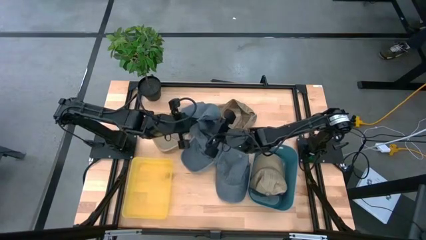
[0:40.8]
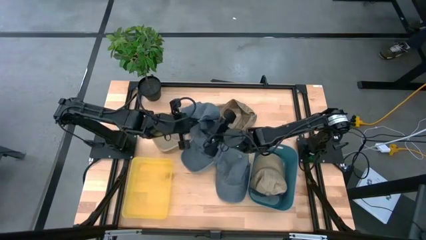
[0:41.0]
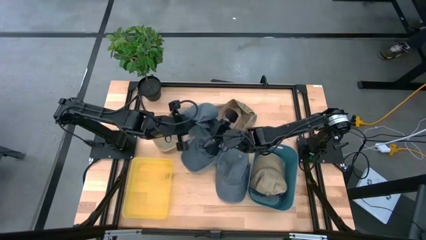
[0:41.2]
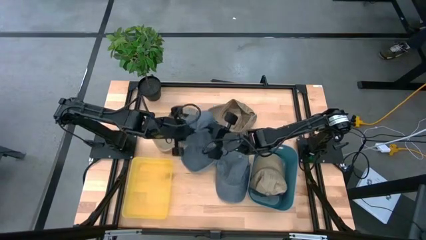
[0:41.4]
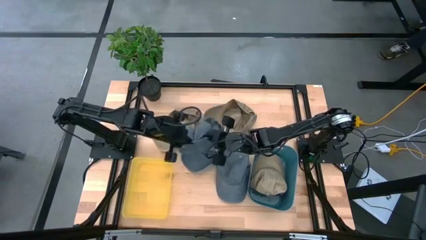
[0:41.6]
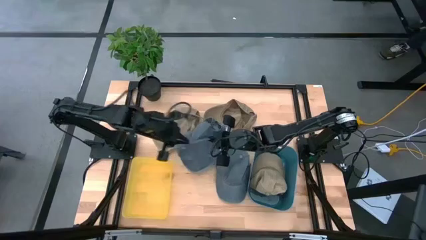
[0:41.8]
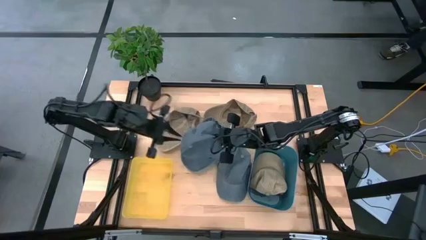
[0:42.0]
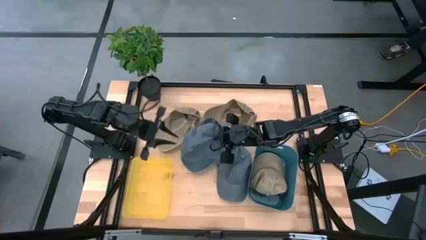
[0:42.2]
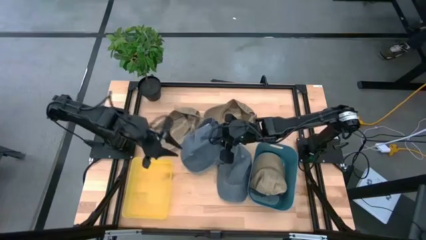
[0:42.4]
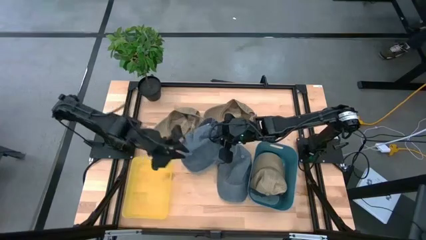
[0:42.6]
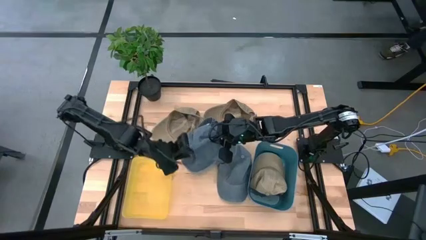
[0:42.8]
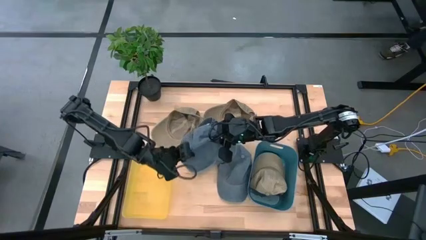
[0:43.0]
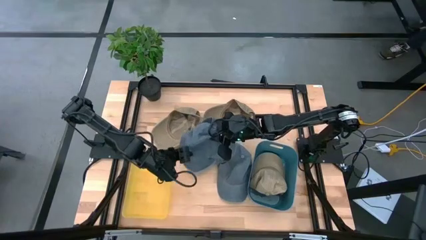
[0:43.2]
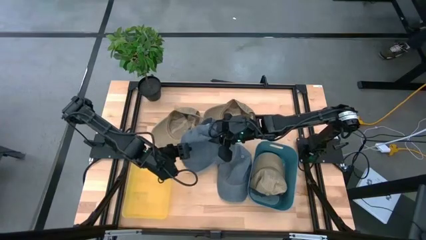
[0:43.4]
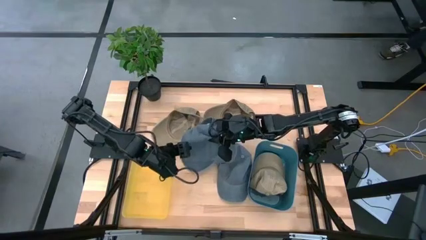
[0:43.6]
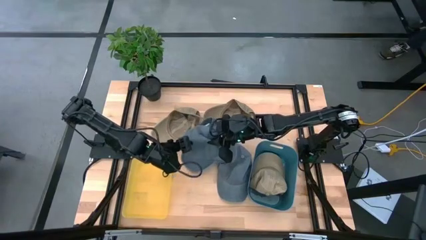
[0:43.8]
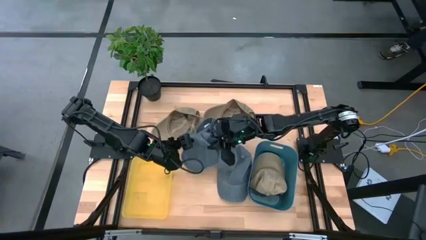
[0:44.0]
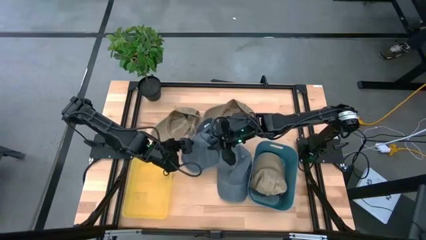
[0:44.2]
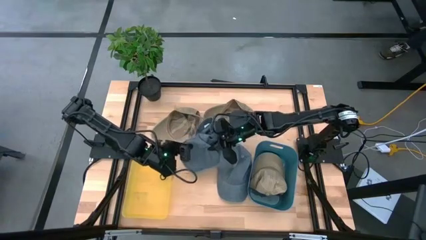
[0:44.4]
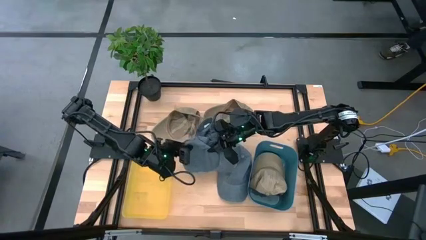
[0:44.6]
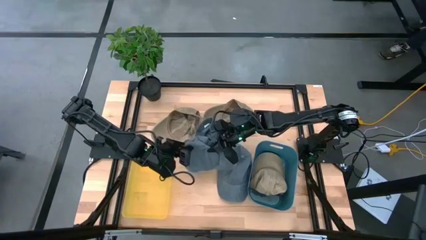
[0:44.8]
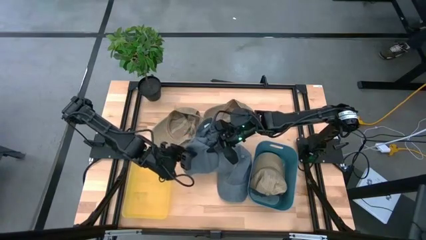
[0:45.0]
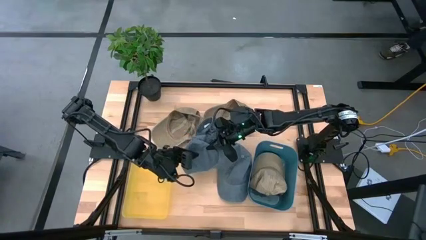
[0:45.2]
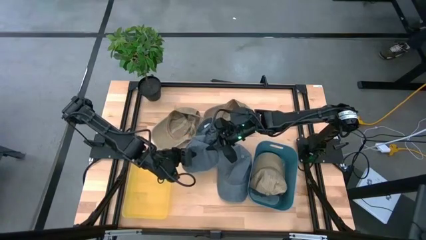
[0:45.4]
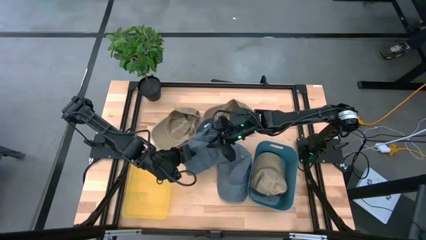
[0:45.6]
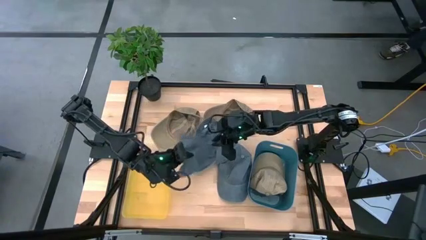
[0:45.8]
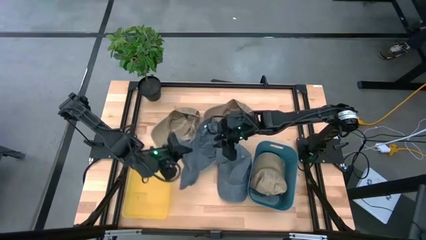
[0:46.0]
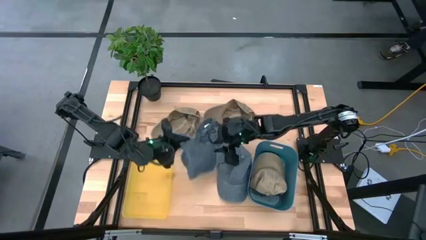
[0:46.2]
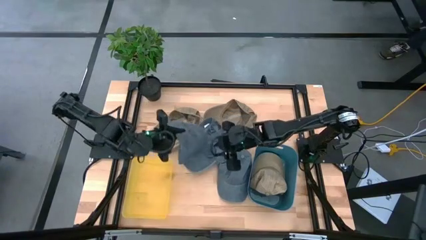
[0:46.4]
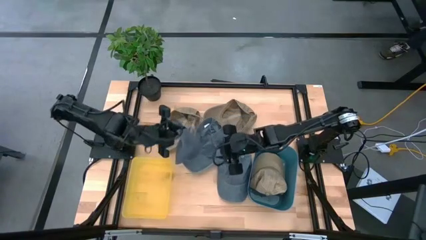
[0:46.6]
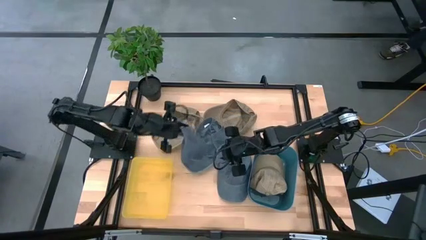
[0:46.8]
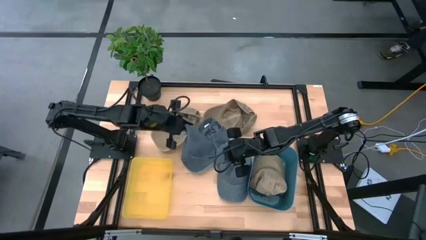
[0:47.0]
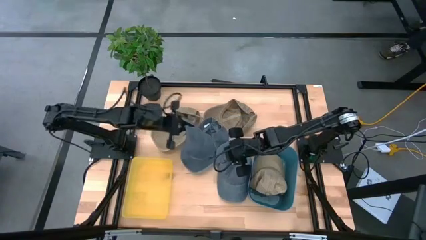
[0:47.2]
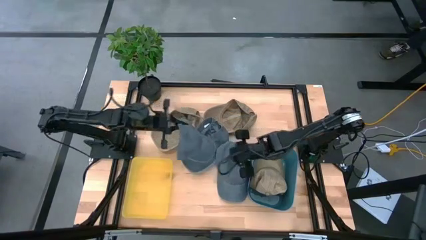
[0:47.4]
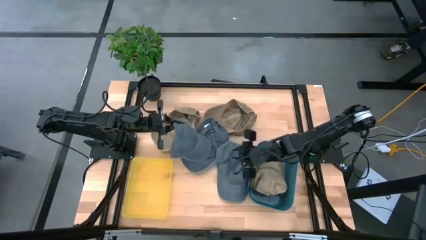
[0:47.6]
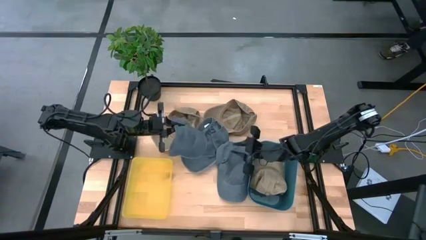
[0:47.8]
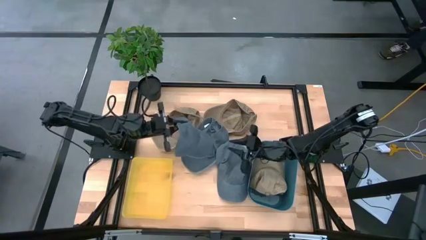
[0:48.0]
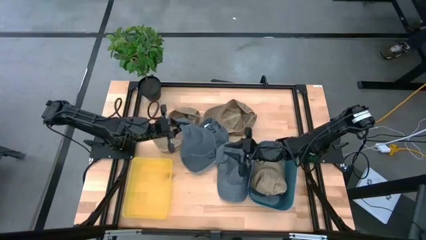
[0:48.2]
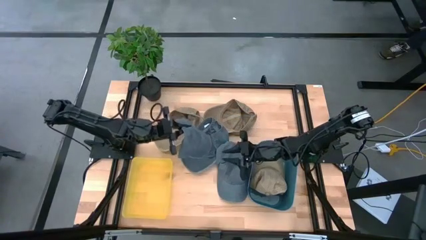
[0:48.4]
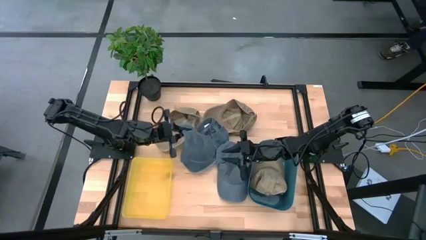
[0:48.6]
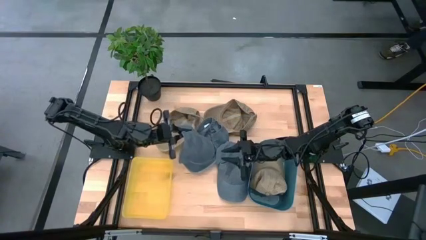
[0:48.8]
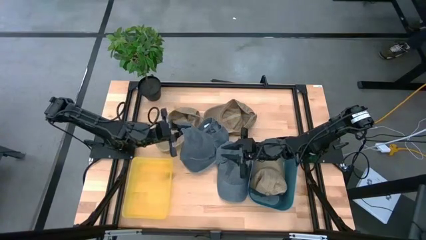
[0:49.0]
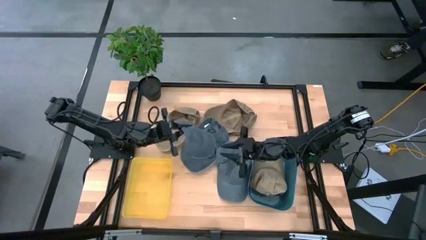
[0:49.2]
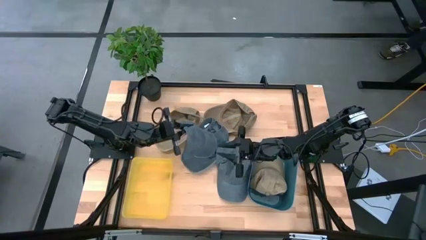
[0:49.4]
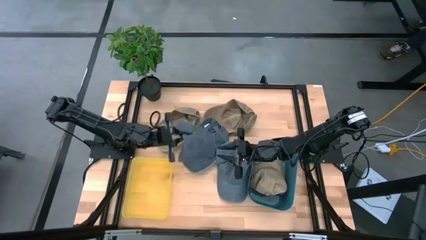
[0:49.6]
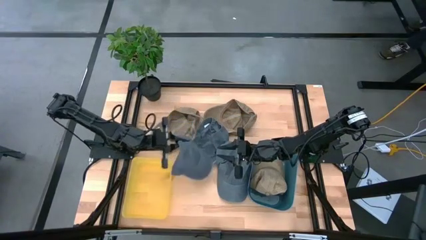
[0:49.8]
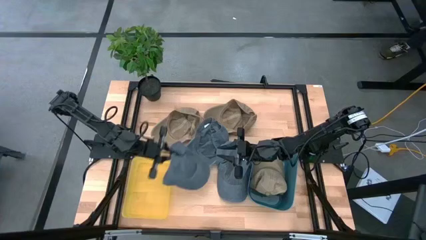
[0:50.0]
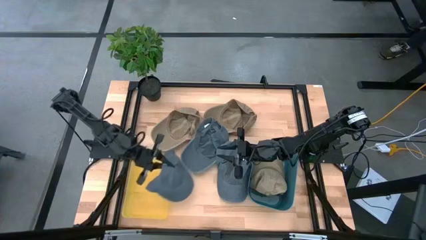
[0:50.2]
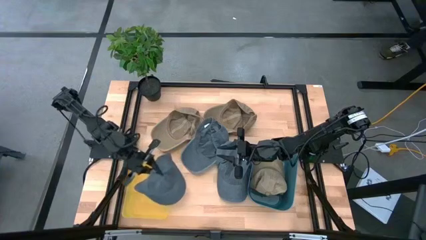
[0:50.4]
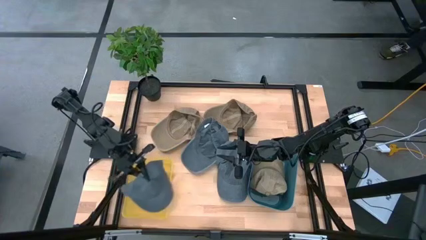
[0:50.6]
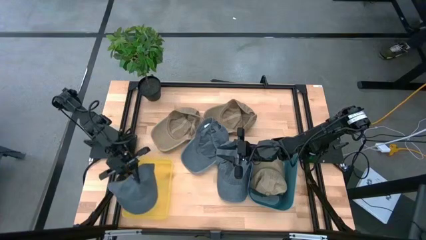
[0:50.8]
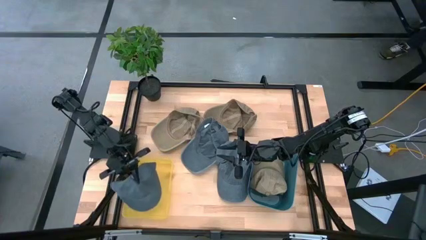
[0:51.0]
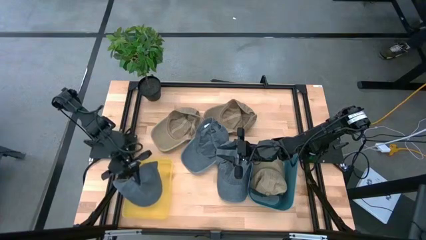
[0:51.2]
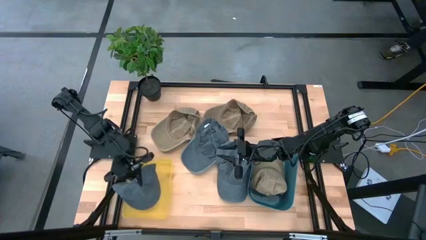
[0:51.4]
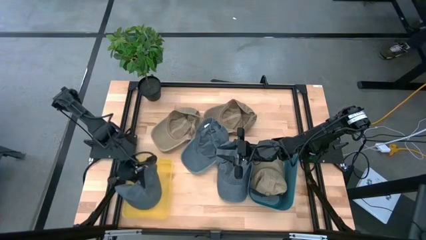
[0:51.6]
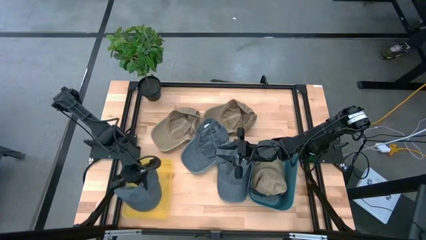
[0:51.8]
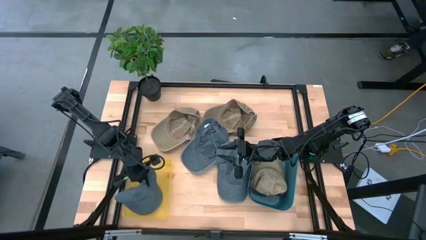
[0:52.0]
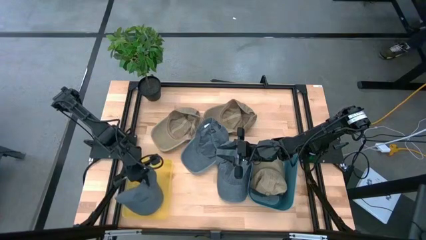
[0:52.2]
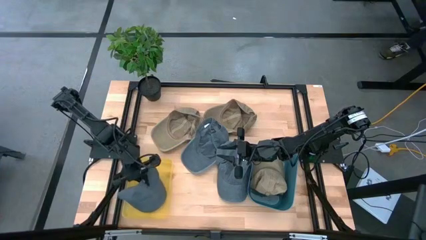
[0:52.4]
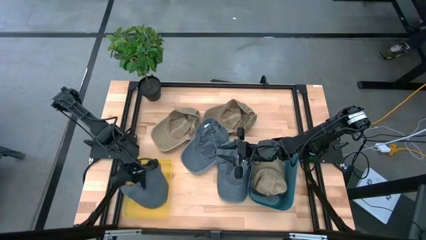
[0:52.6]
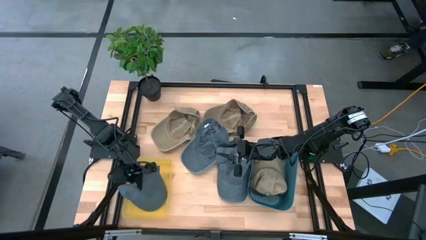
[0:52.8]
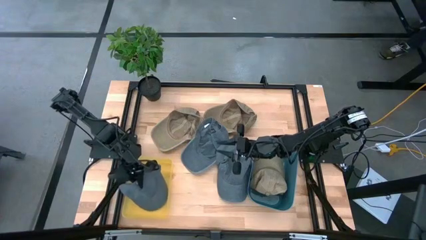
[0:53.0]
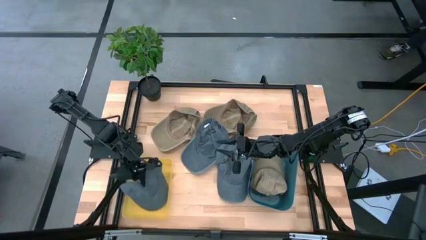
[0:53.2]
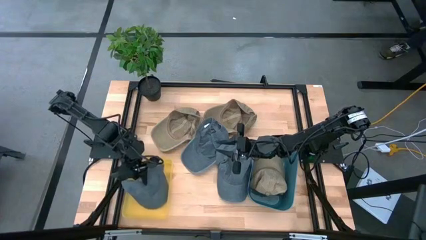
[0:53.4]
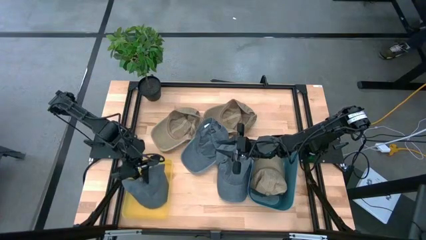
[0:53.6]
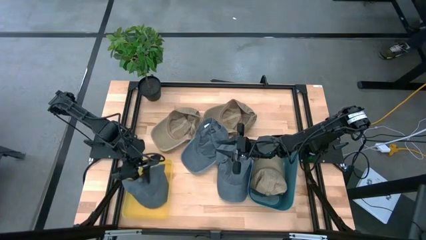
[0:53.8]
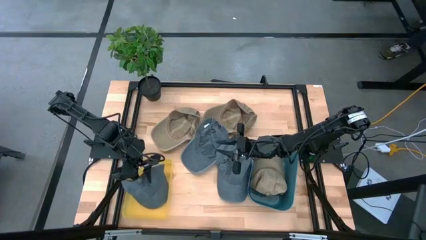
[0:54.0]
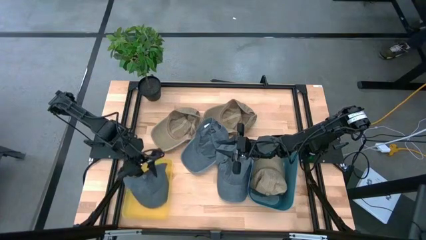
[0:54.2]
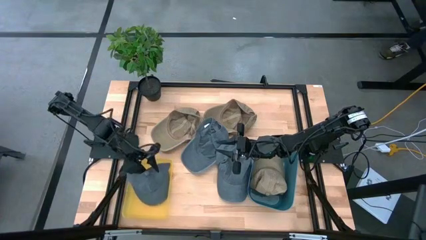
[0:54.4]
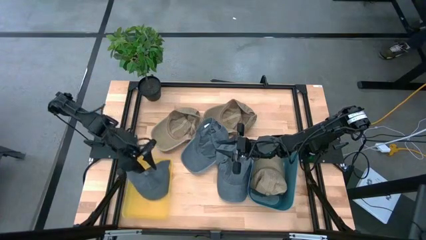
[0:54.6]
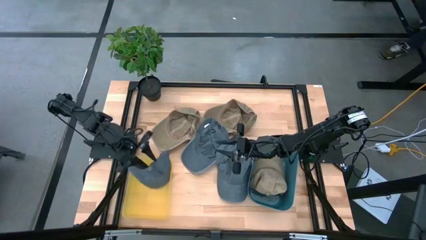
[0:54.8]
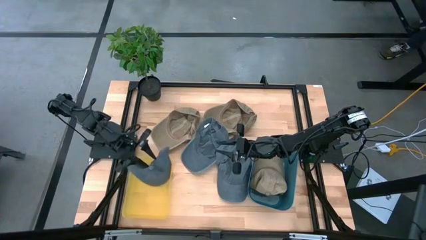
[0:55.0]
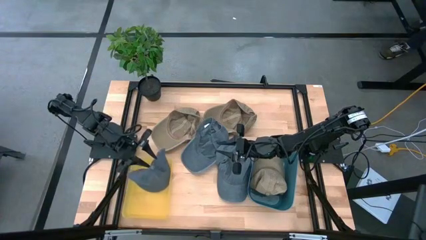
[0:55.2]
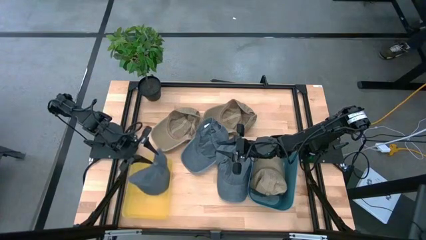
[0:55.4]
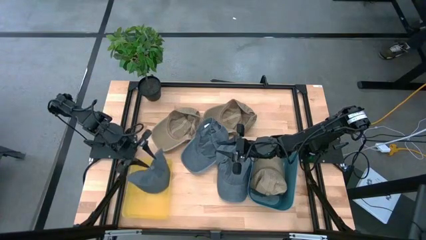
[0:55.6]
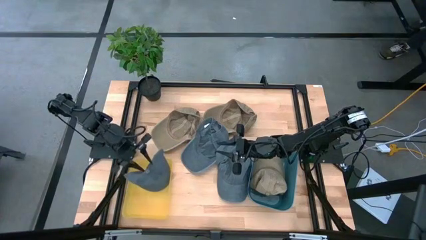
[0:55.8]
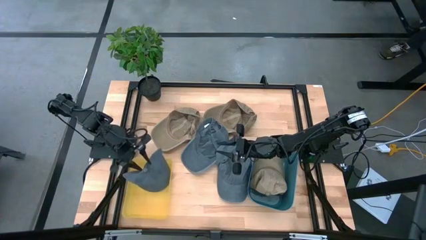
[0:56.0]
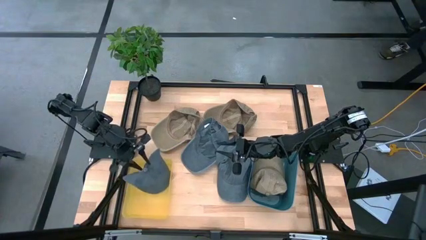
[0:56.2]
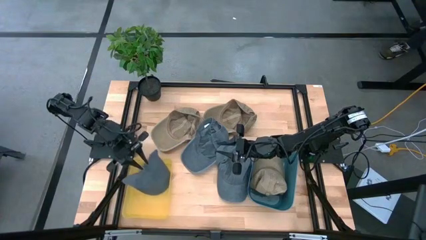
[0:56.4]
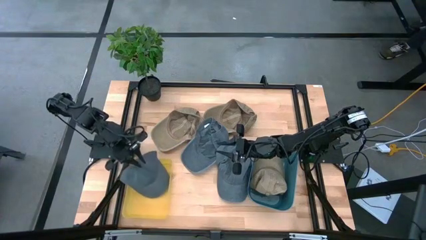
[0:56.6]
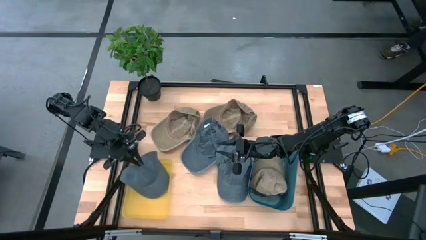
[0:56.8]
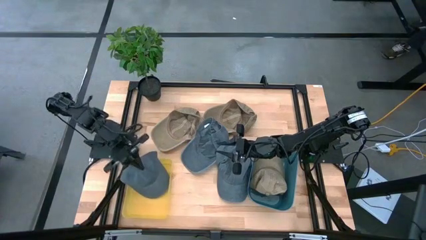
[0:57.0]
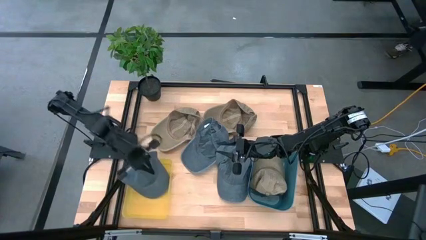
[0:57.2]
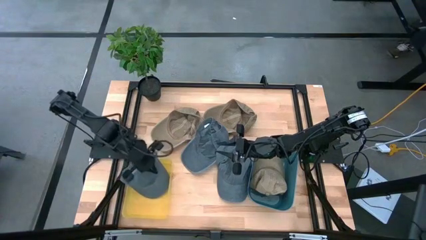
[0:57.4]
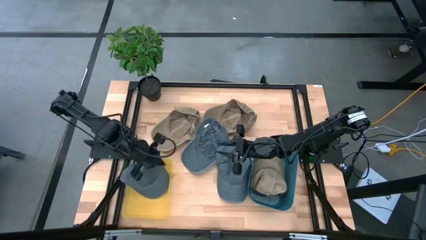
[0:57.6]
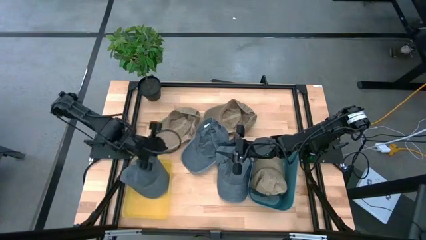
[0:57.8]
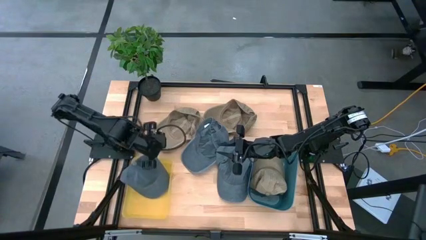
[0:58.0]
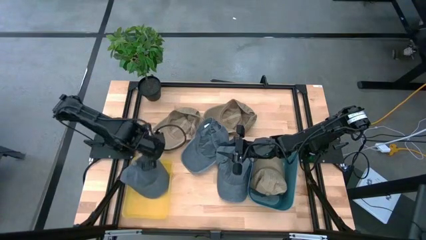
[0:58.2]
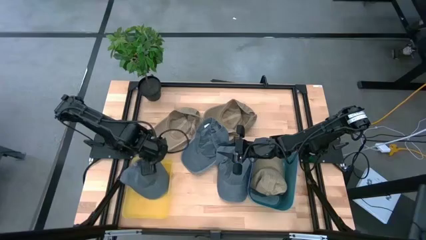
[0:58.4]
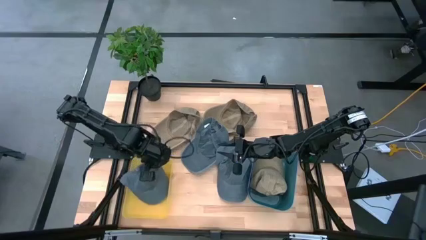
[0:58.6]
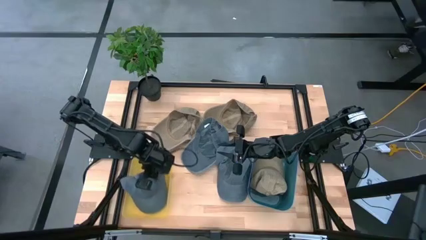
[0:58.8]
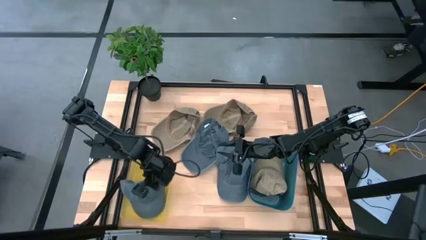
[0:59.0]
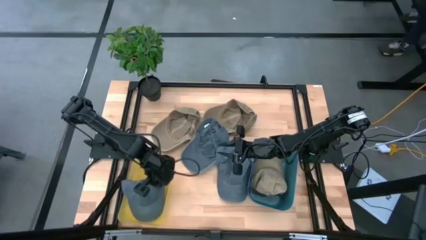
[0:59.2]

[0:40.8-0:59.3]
Task: Pick & Place hat
Put the top left blue cap into the yellow bin
